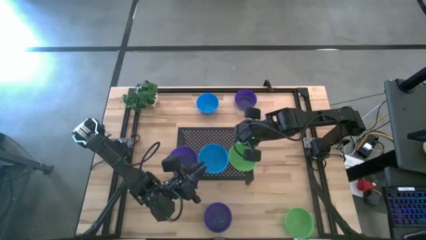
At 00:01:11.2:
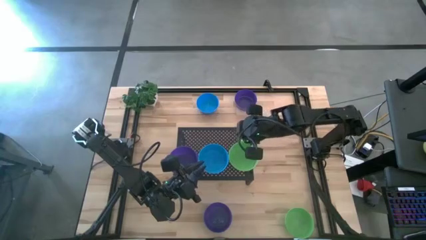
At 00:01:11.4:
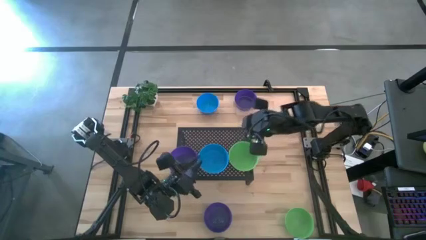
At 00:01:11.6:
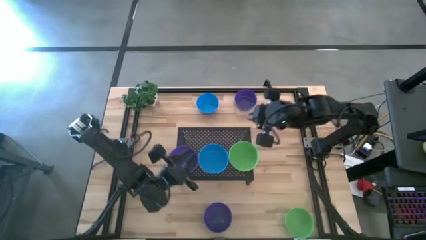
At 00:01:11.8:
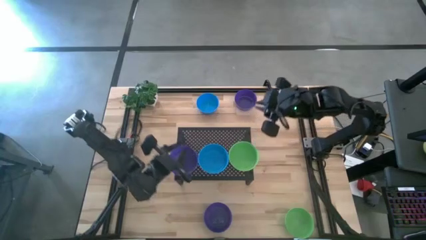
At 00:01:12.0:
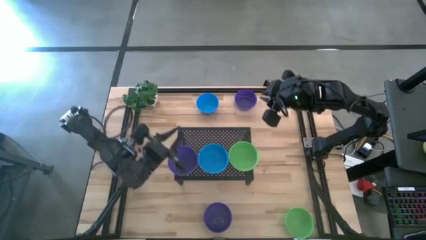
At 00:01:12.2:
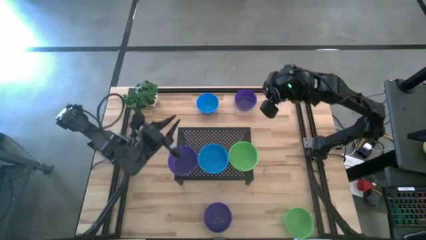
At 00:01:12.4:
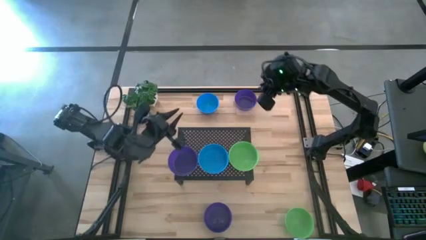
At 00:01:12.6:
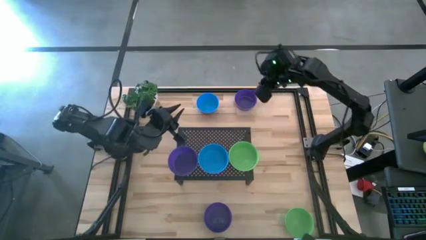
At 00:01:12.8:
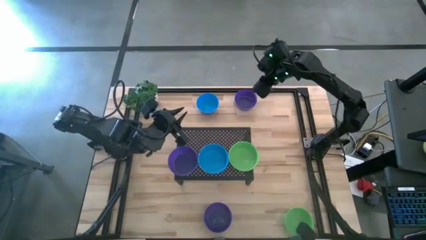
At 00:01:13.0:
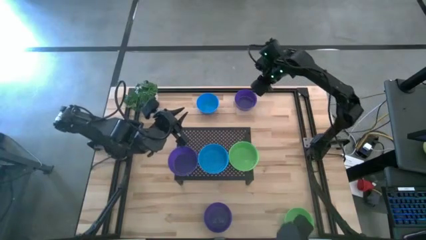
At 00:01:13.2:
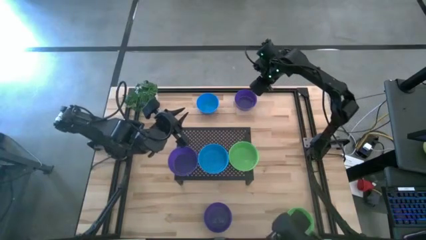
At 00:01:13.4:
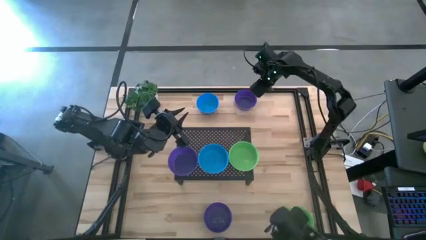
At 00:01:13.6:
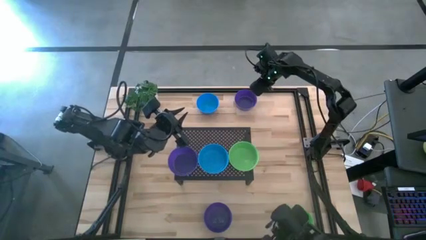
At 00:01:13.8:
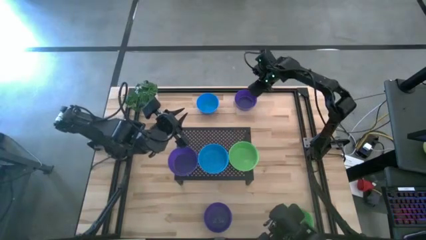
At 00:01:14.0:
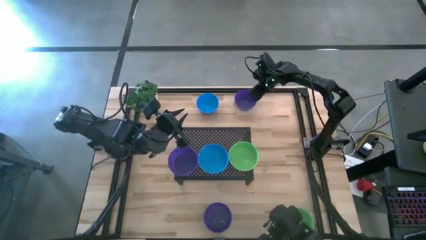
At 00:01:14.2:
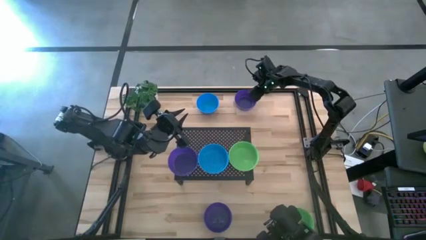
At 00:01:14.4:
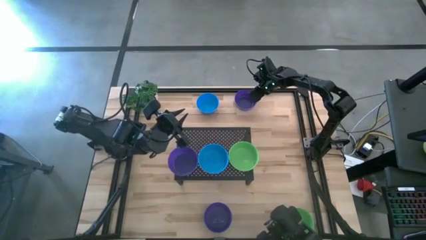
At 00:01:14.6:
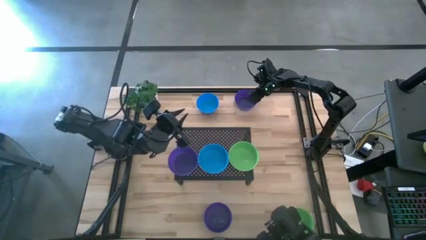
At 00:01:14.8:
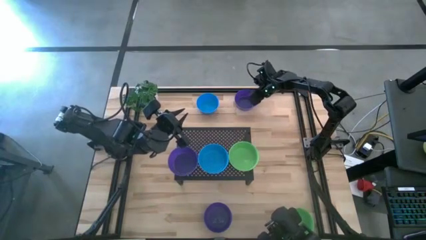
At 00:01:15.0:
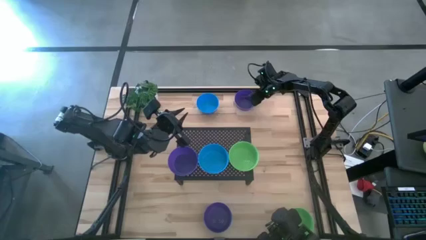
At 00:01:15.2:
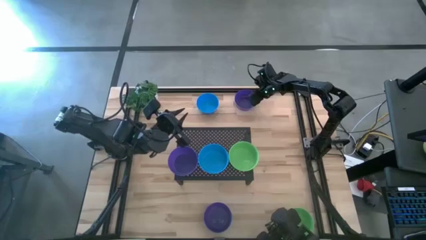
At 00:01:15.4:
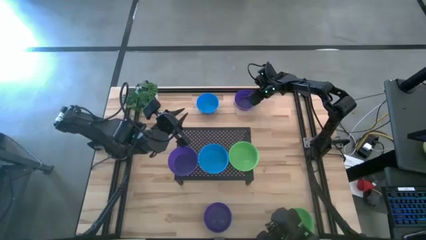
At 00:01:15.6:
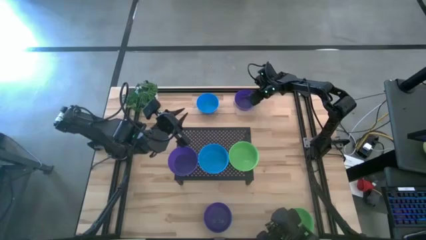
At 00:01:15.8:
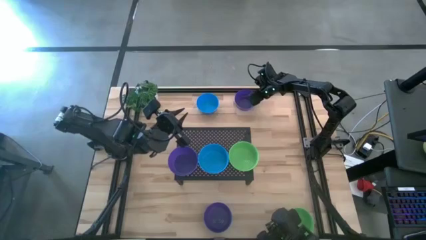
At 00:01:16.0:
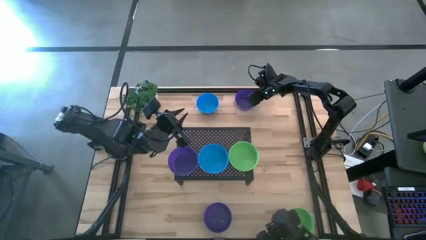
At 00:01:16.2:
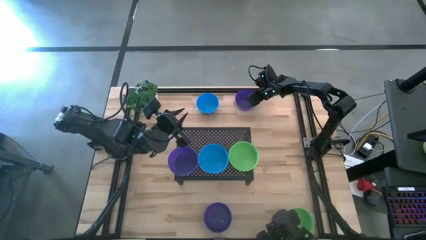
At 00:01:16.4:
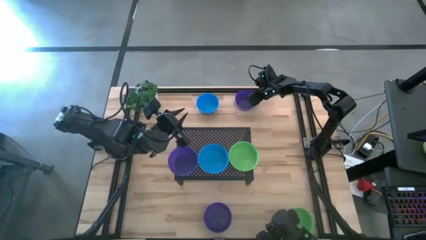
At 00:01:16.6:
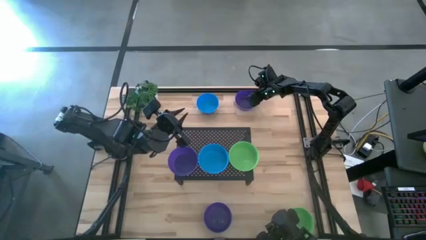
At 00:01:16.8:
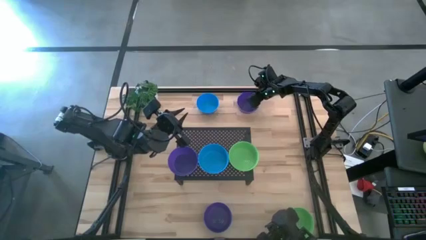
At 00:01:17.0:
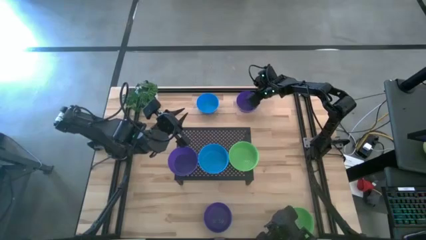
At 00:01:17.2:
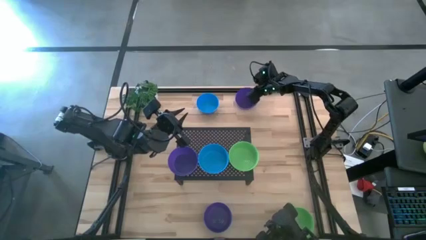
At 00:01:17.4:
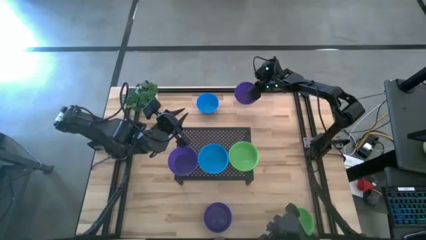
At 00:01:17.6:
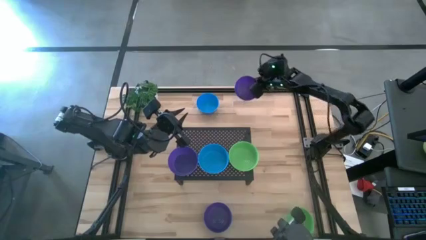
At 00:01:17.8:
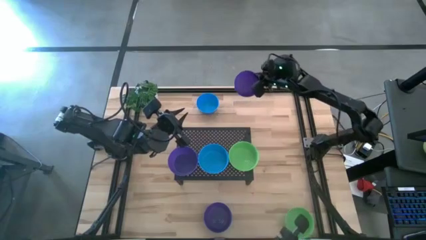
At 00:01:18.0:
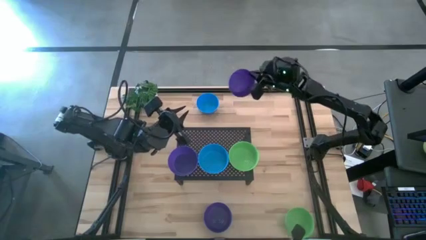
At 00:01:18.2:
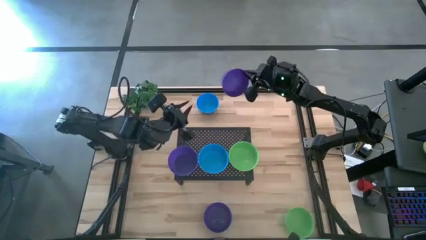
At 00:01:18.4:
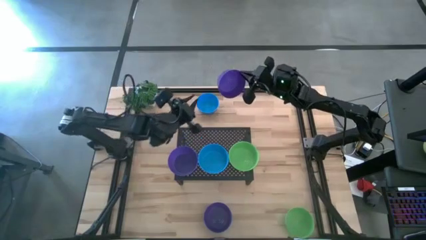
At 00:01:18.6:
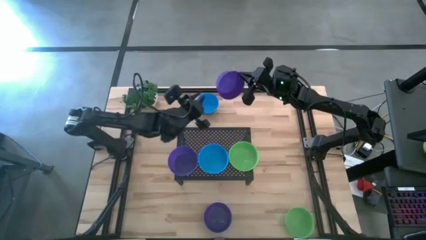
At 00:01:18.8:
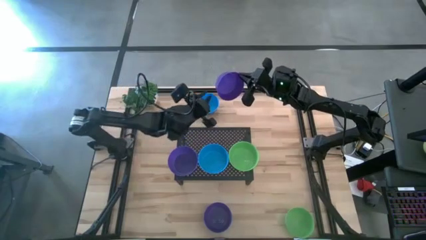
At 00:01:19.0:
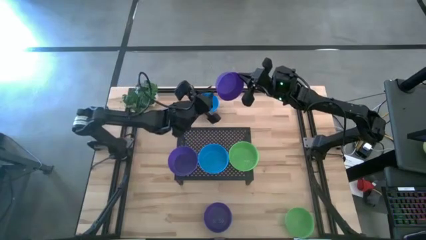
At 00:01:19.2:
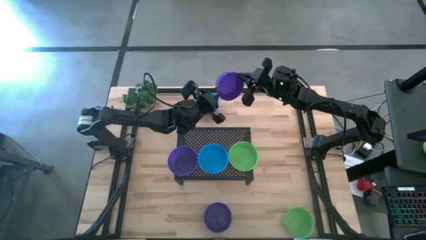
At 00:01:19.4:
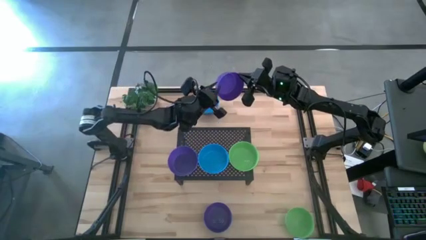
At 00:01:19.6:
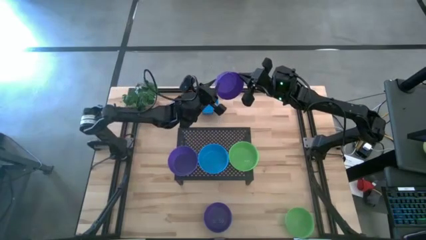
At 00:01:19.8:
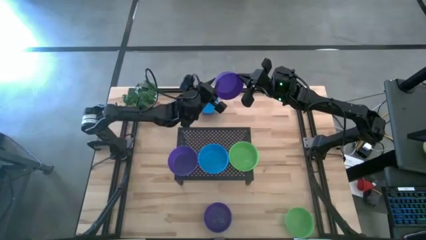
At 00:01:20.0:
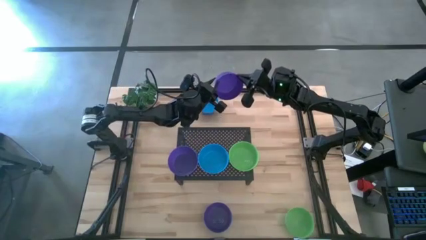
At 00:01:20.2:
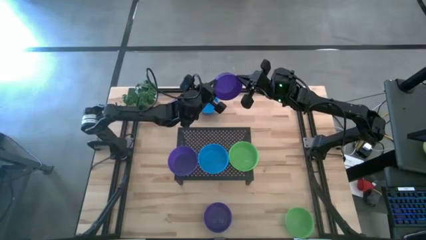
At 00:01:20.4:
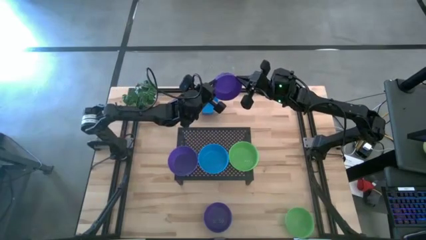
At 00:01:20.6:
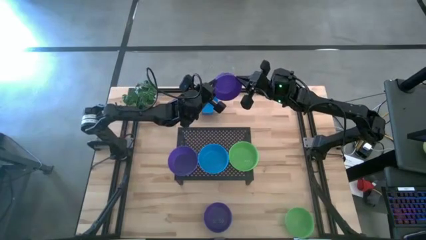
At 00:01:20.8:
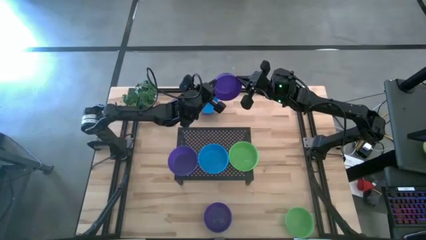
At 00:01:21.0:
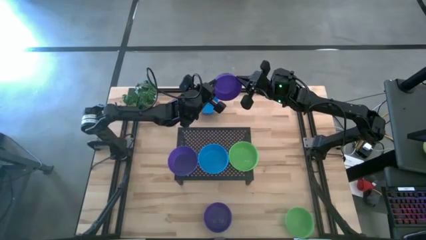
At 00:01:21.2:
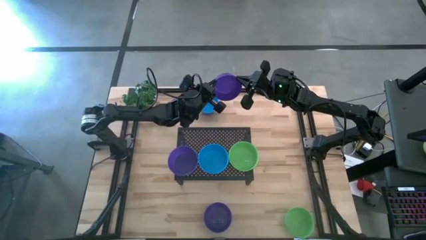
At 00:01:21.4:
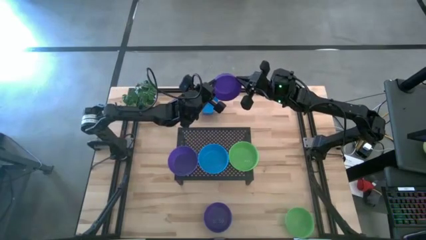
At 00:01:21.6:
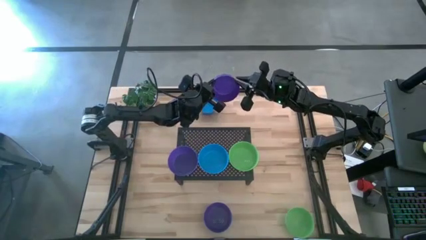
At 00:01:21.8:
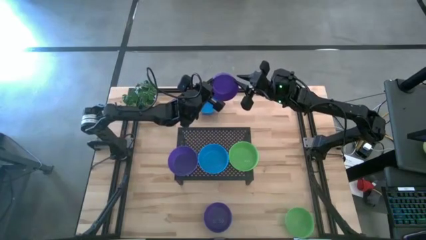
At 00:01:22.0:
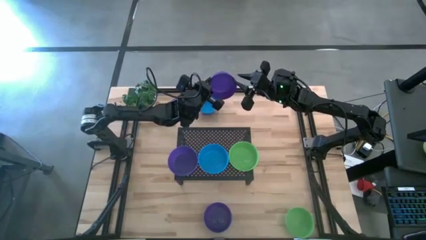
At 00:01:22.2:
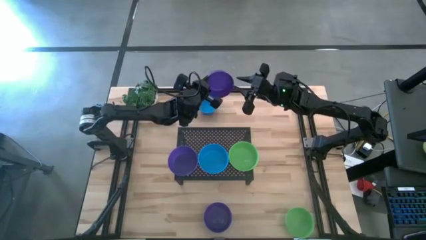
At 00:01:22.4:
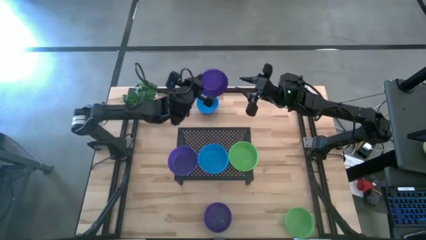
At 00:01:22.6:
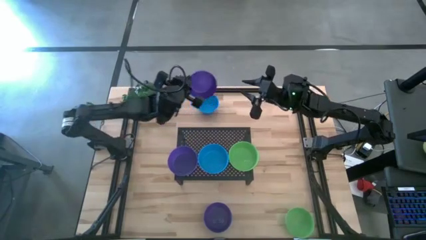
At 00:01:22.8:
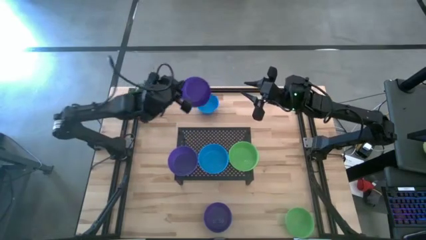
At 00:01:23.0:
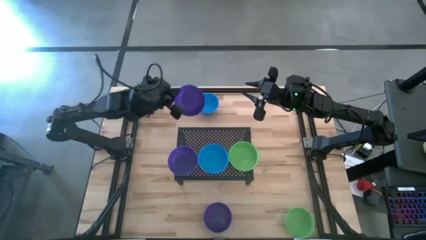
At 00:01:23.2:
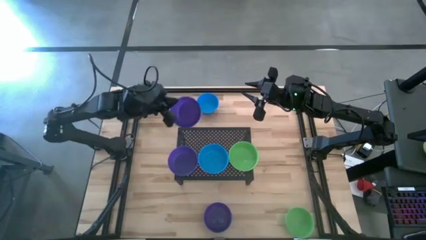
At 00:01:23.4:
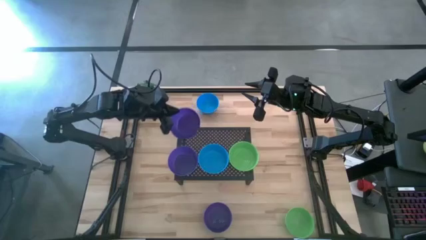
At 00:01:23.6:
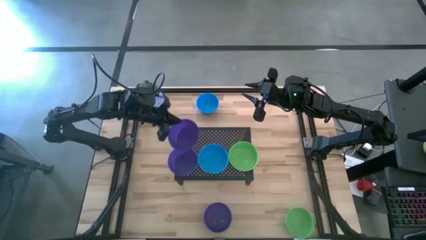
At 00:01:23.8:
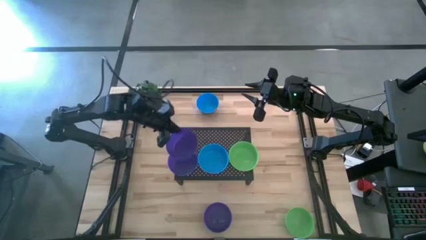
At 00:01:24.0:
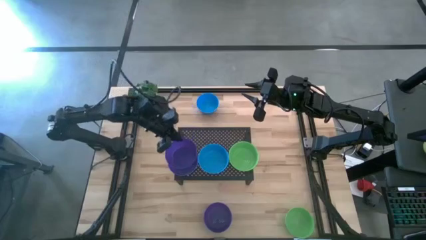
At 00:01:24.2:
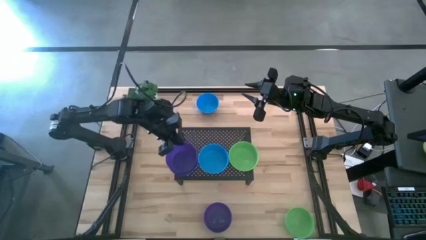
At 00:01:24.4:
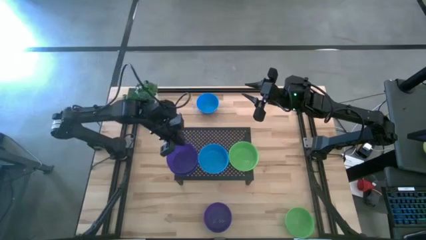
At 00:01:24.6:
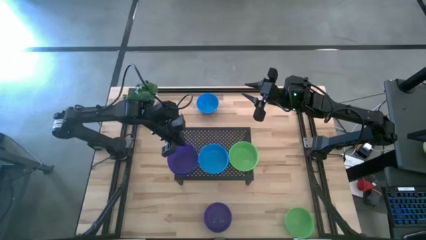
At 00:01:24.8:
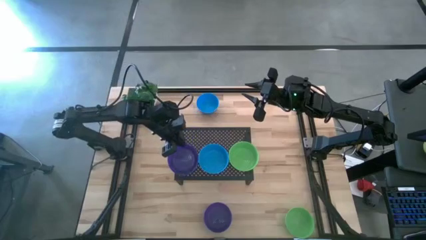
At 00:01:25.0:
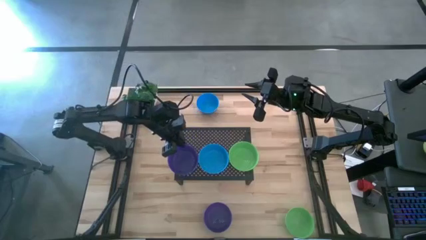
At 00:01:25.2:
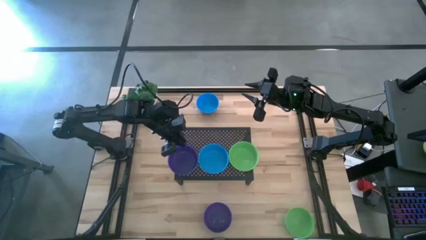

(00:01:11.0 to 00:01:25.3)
Task: Pick & Place Mini bowls
Stack the top violet bowl on the violet bowl on the shelf
